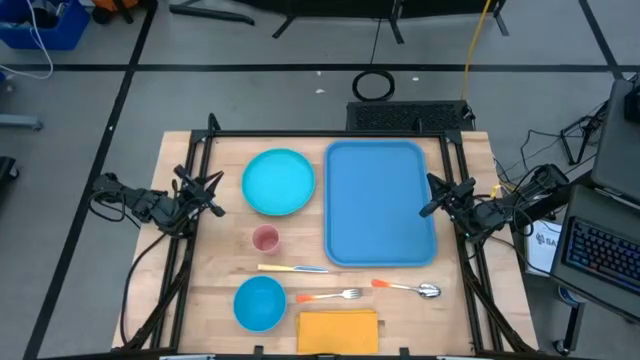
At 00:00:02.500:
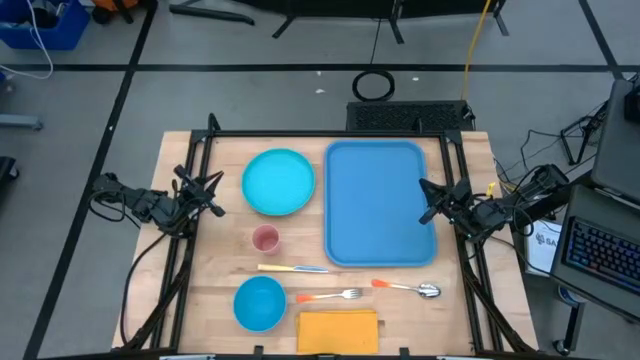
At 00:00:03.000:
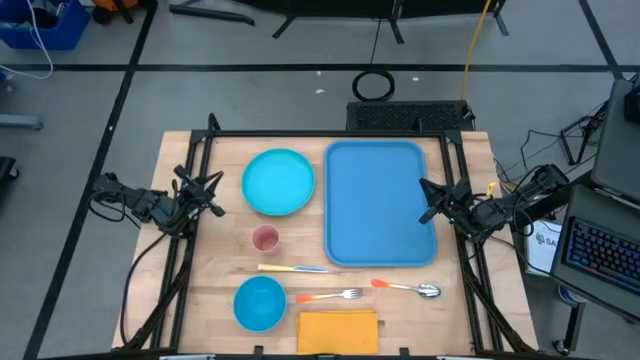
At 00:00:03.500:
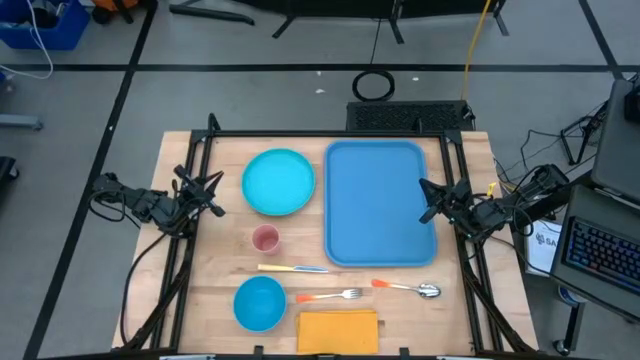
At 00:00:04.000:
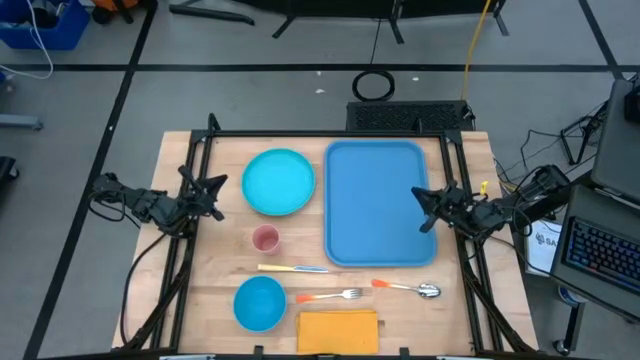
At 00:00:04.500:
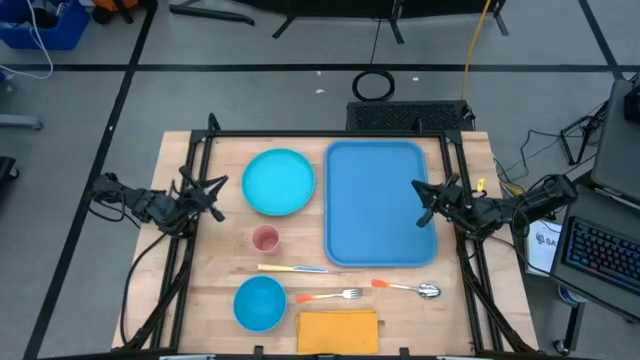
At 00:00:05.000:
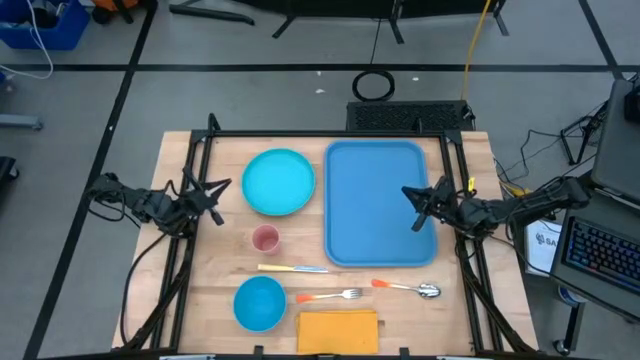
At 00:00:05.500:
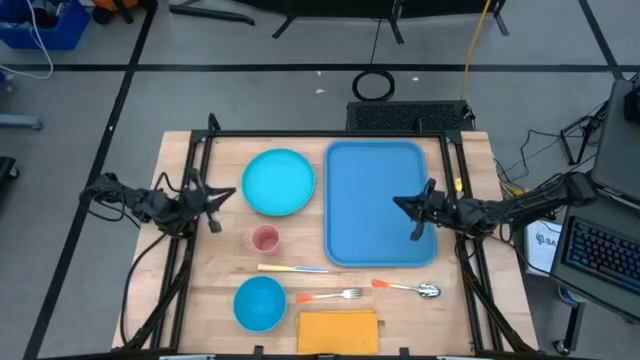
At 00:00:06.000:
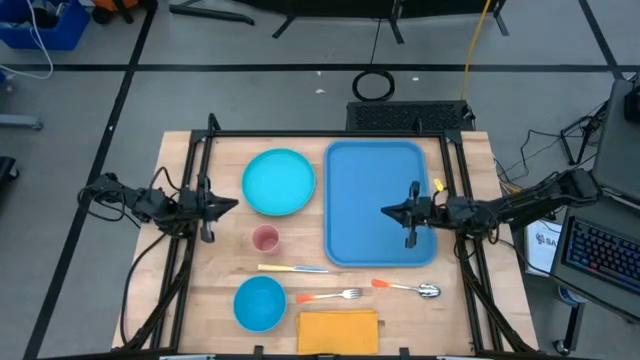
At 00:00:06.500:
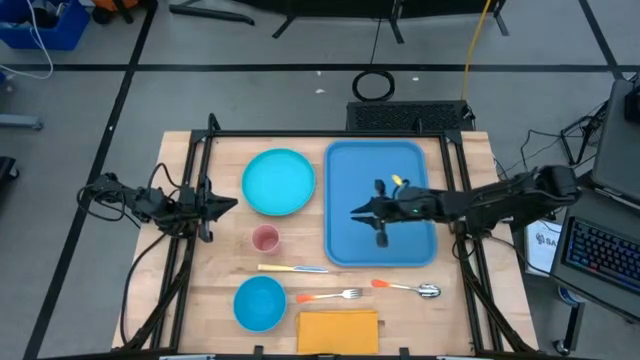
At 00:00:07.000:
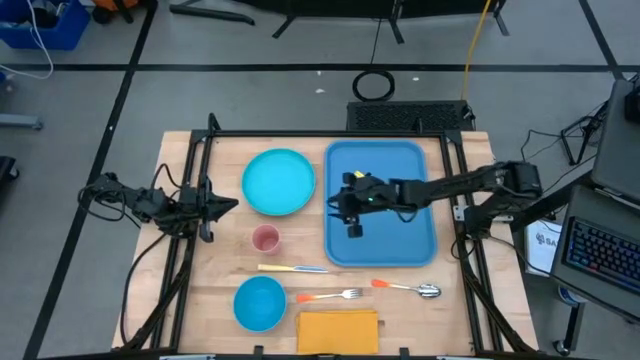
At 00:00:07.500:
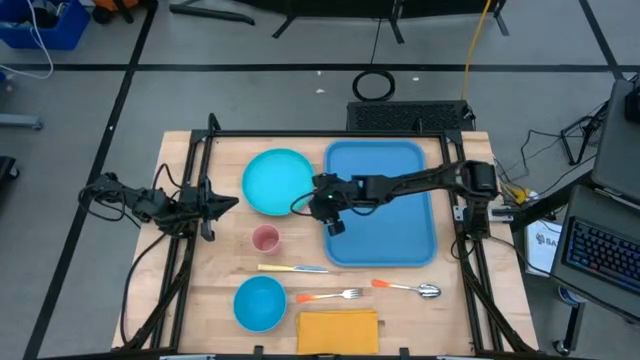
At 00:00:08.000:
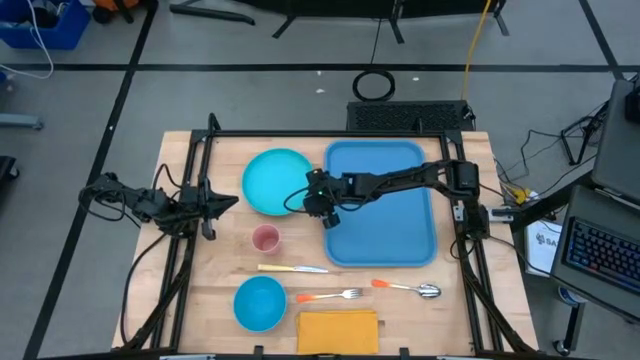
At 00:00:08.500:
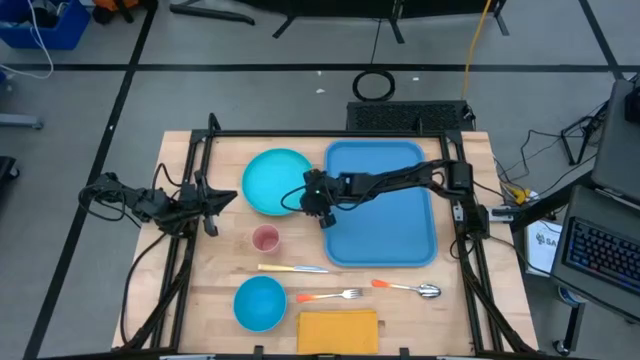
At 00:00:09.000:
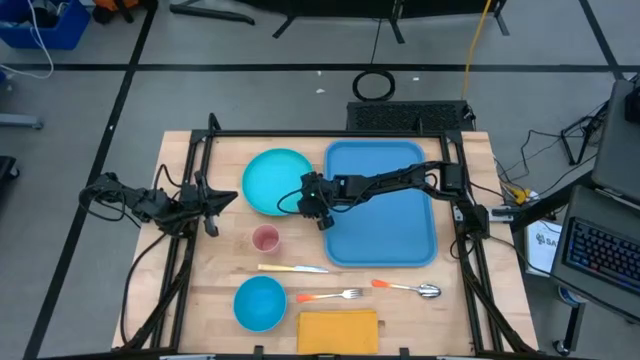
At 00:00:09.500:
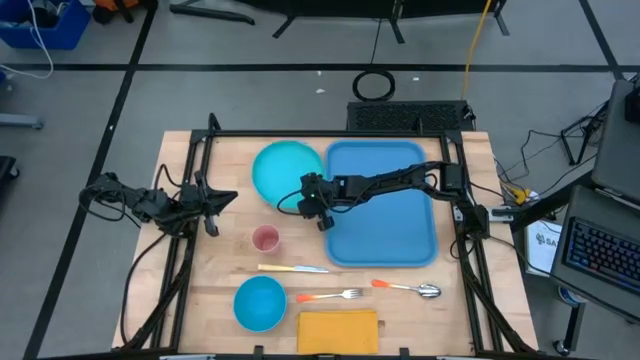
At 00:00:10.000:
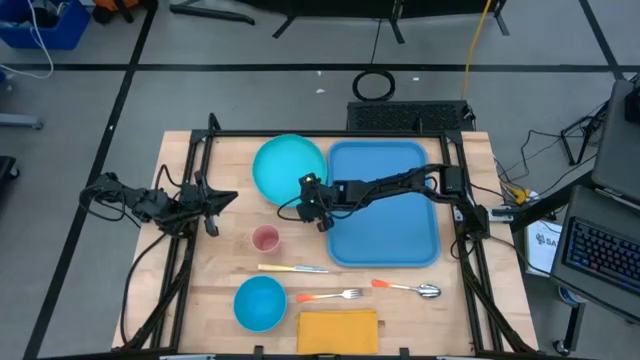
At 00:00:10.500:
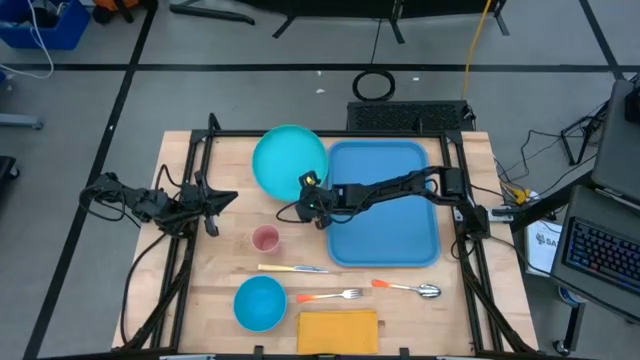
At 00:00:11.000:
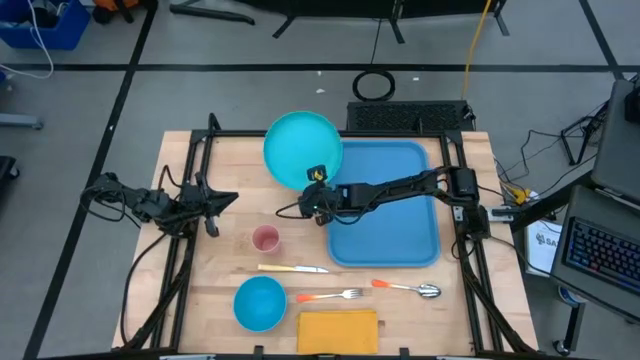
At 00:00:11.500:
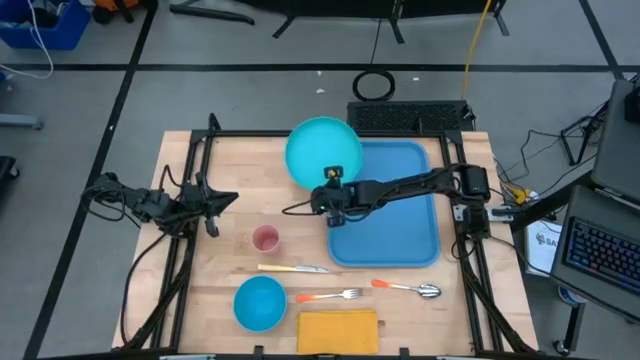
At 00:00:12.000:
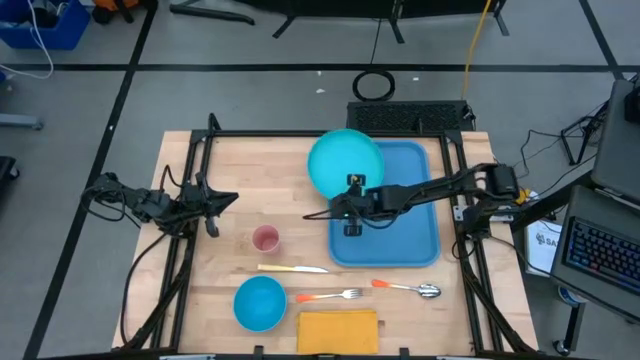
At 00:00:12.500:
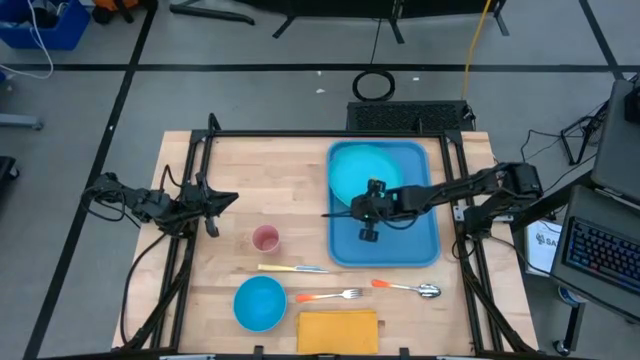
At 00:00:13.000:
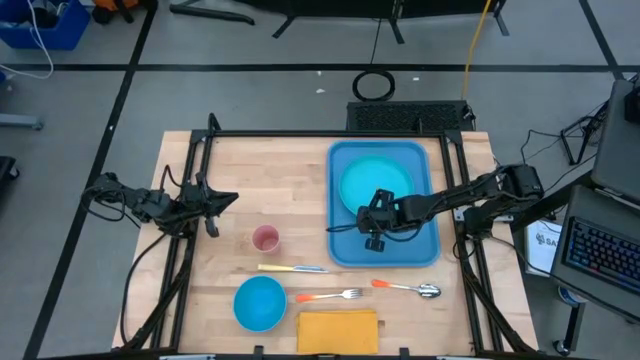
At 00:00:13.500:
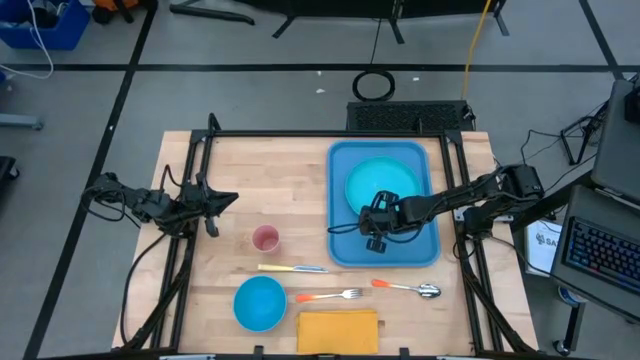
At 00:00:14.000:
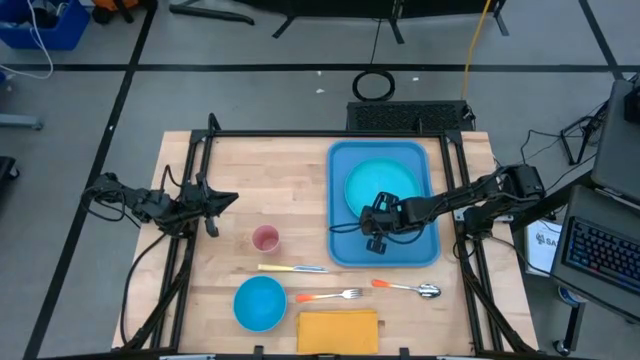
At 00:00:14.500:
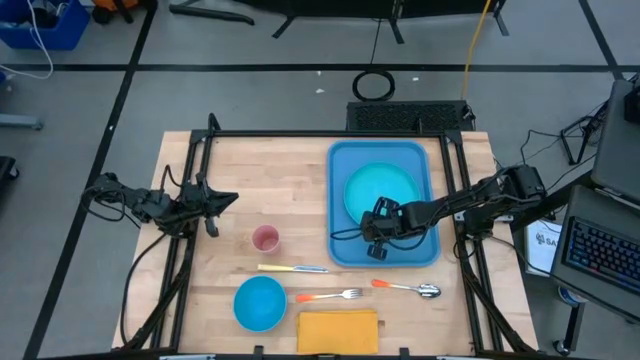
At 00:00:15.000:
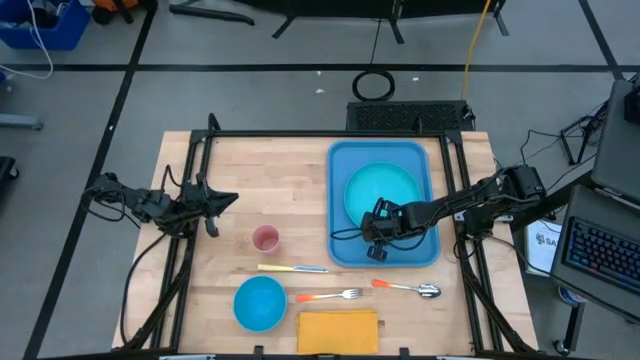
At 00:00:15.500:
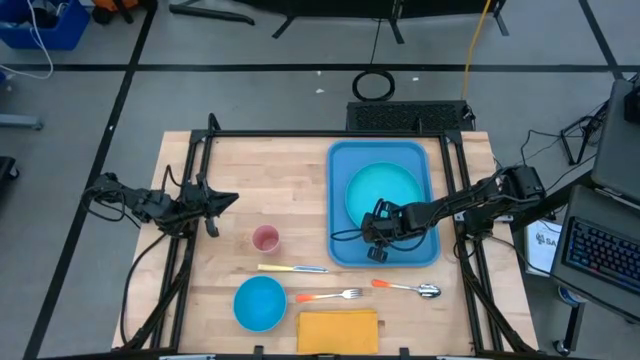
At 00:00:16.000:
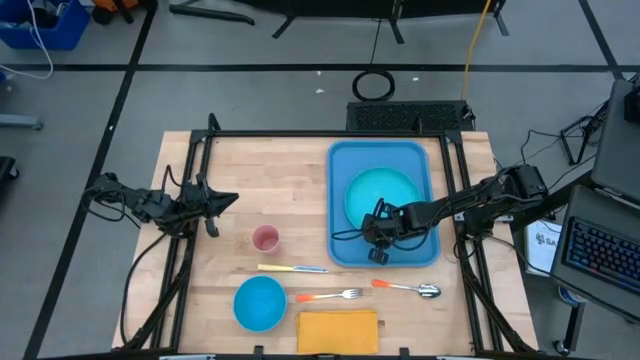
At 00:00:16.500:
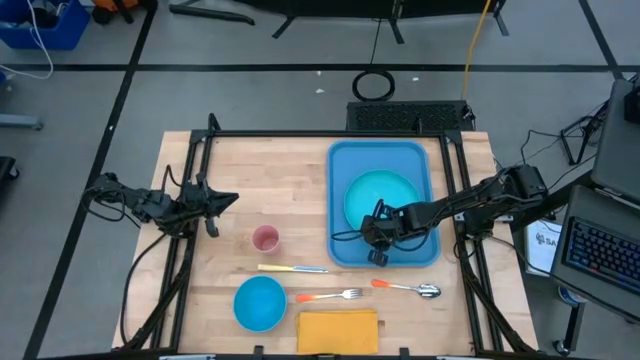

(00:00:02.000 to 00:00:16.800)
Task: Set up tray
Put the green plate on the blue serving tray

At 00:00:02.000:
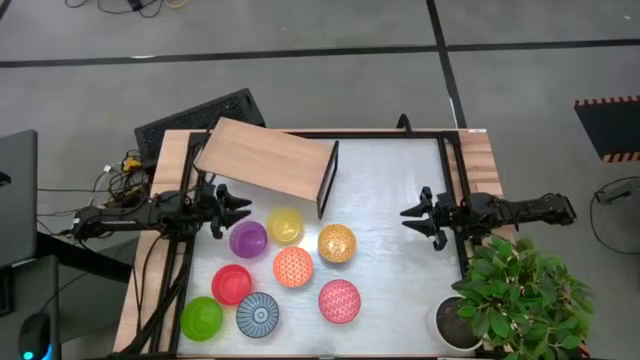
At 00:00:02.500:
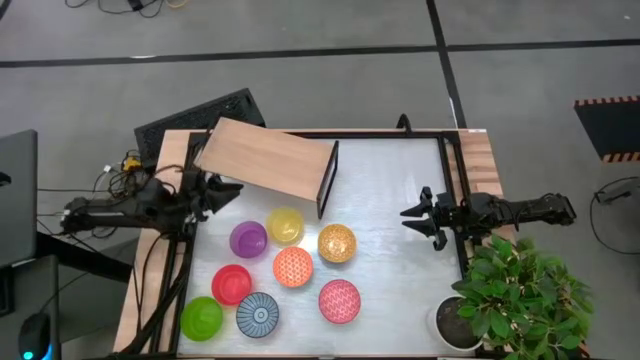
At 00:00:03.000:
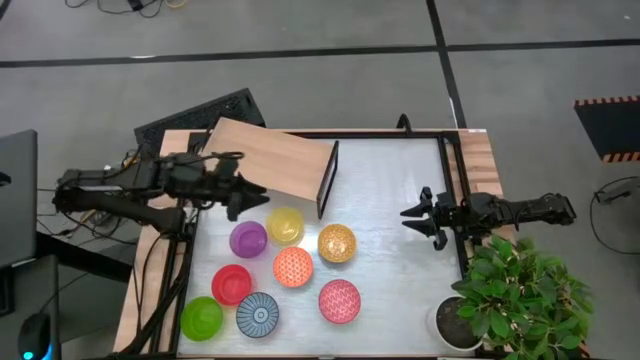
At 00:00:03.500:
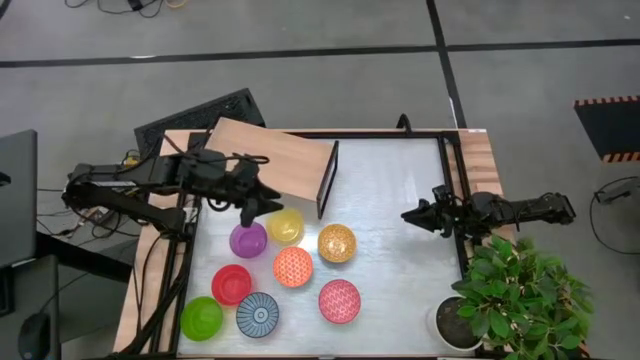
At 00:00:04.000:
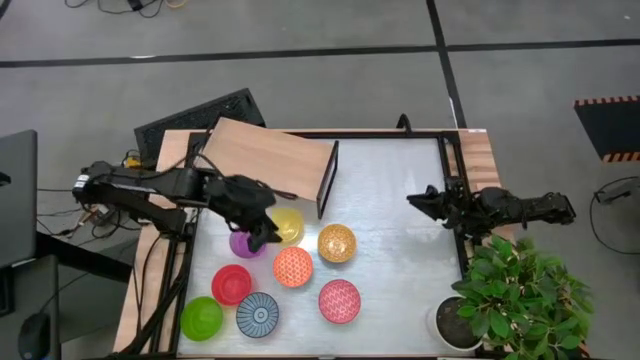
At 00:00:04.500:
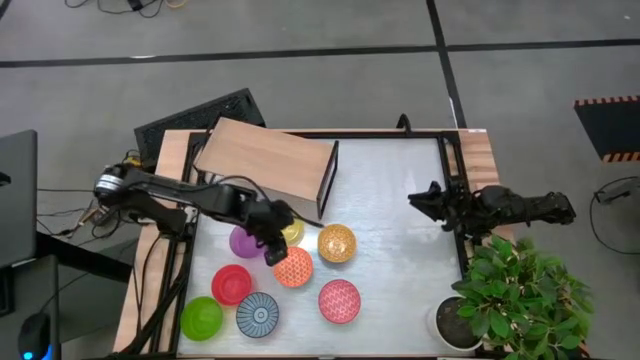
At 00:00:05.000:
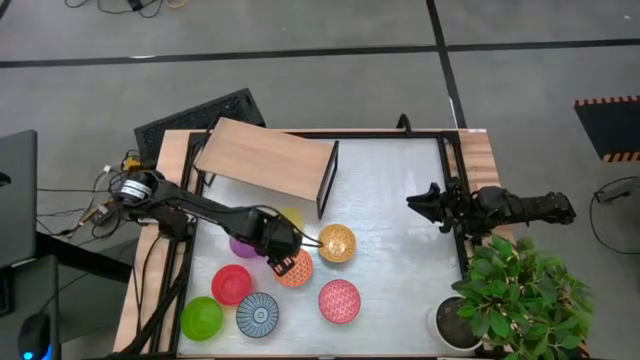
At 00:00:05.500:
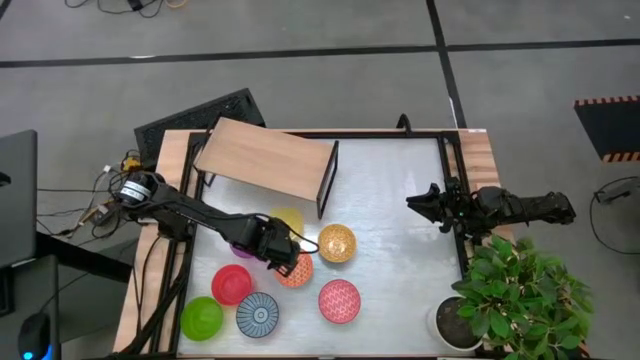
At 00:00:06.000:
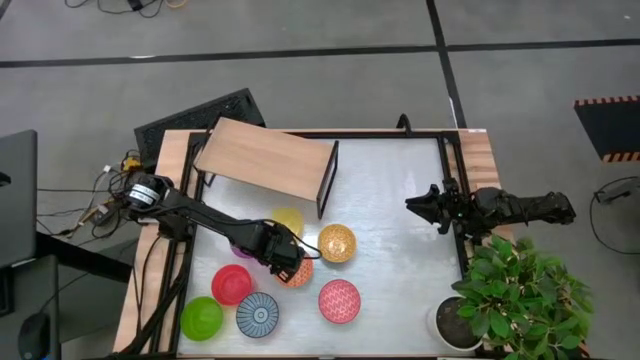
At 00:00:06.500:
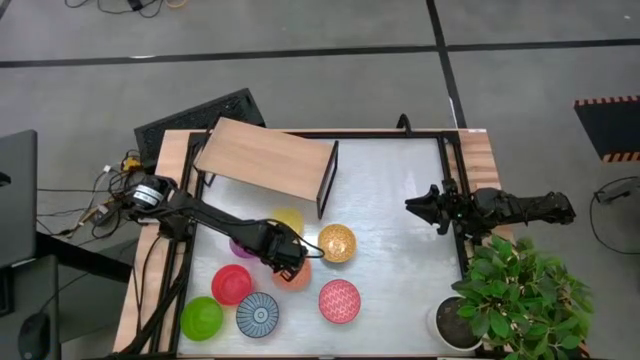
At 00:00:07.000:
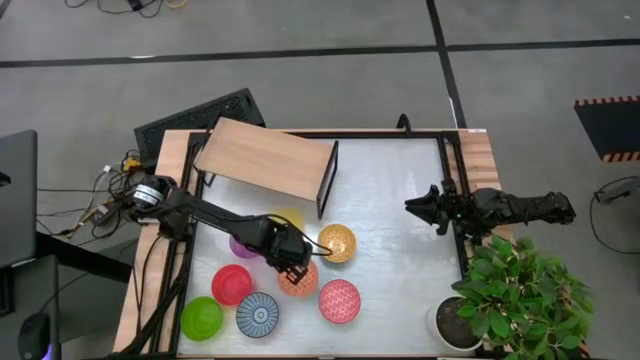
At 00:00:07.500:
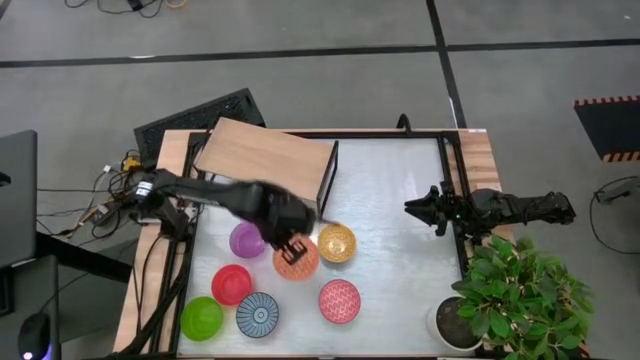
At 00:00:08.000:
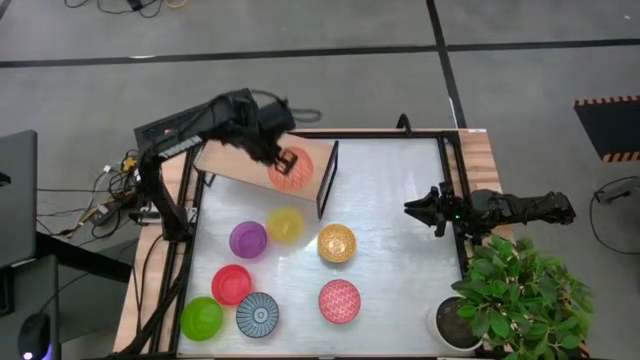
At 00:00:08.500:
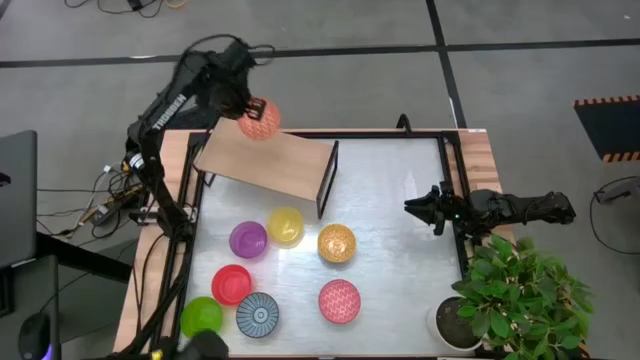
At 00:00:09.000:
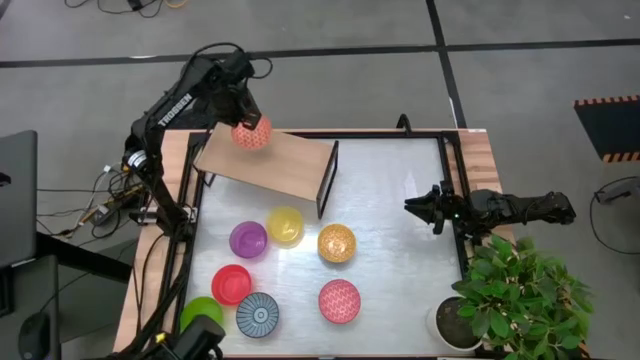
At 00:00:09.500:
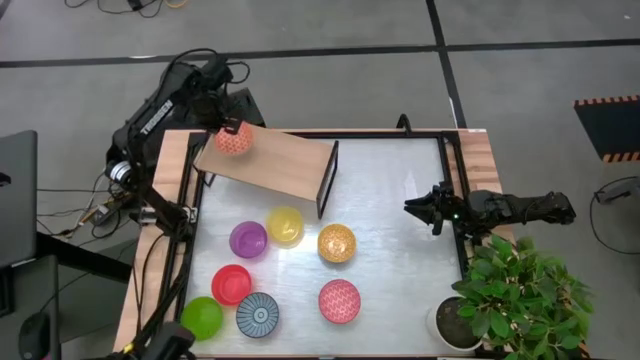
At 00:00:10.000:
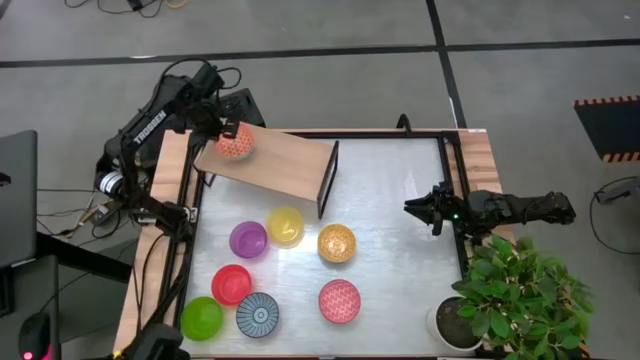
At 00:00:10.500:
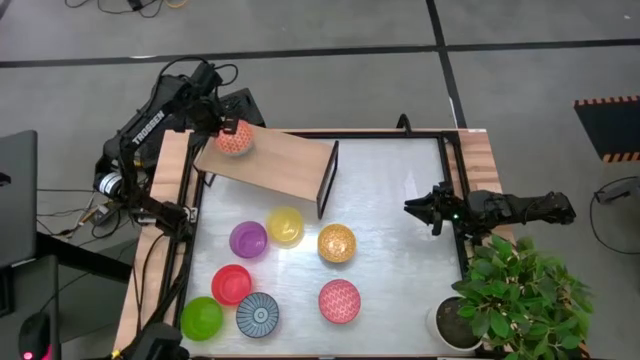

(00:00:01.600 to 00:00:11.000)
Task: Place and stack bowls onto a shelf
Put the orange patterned bowl on the shelf
